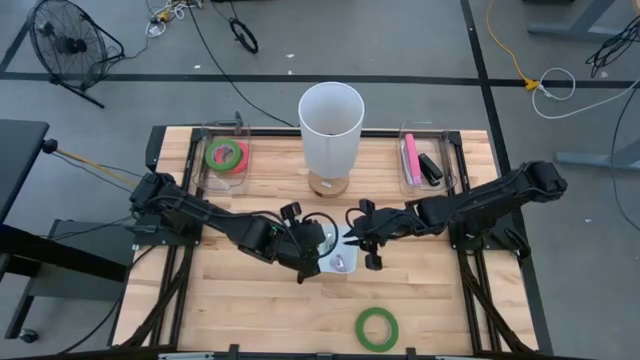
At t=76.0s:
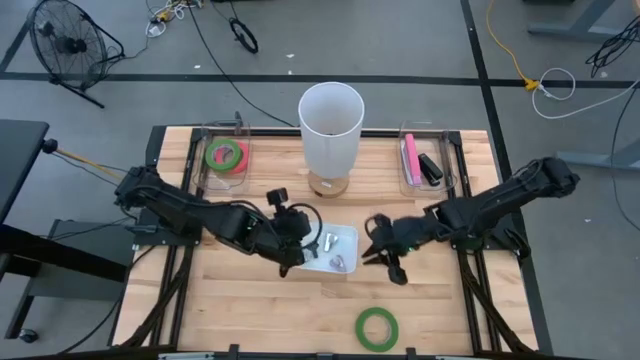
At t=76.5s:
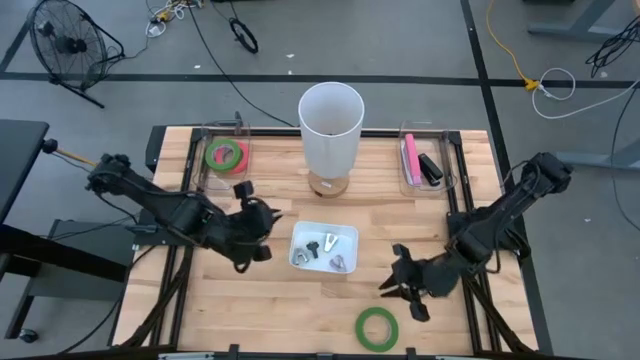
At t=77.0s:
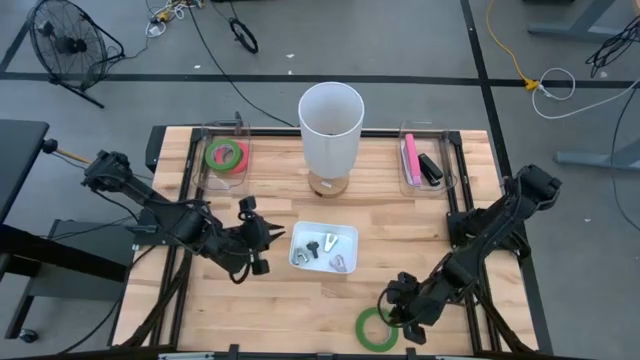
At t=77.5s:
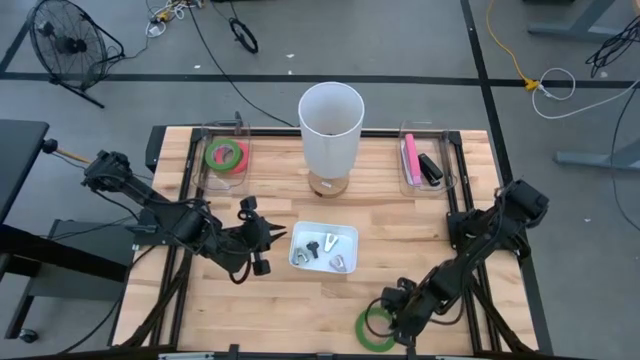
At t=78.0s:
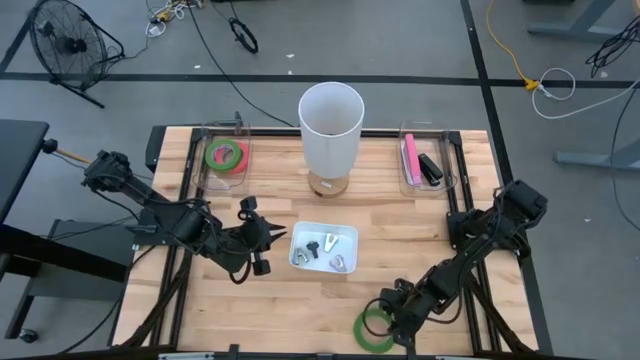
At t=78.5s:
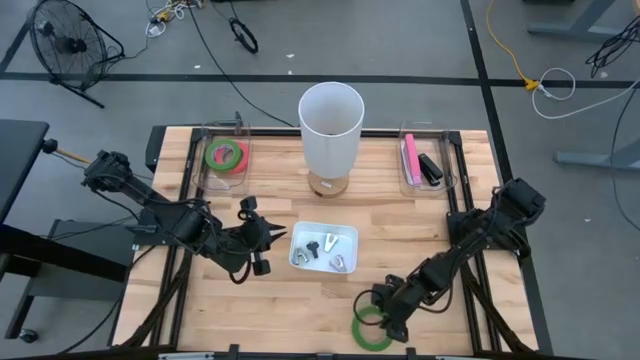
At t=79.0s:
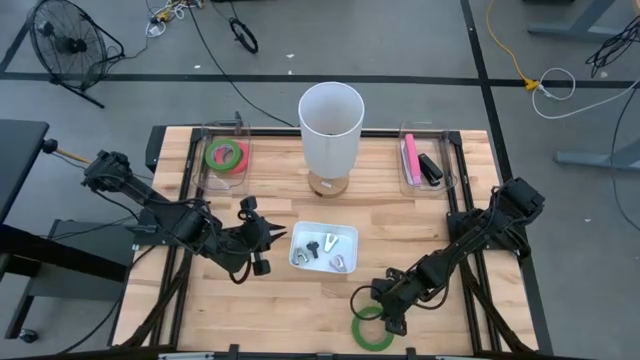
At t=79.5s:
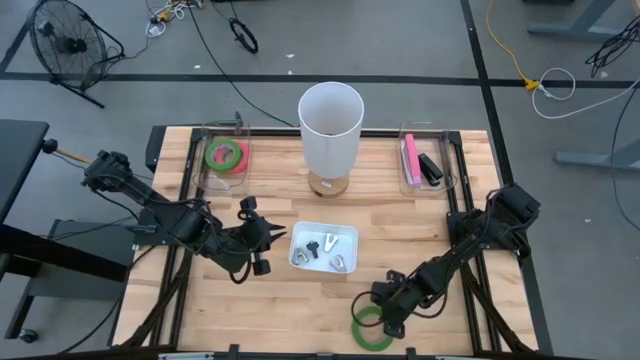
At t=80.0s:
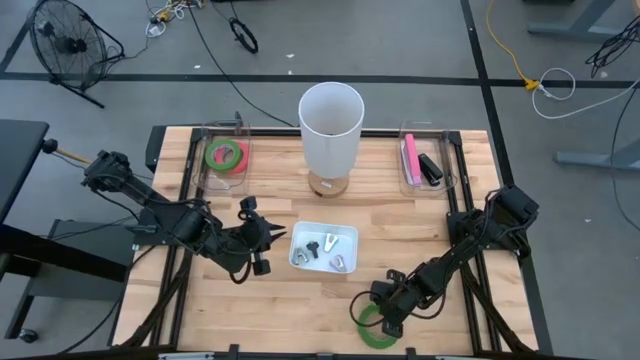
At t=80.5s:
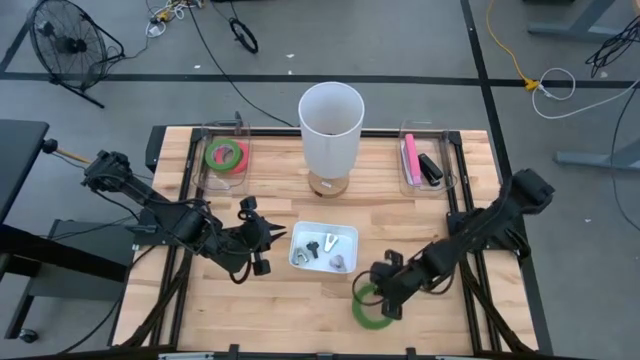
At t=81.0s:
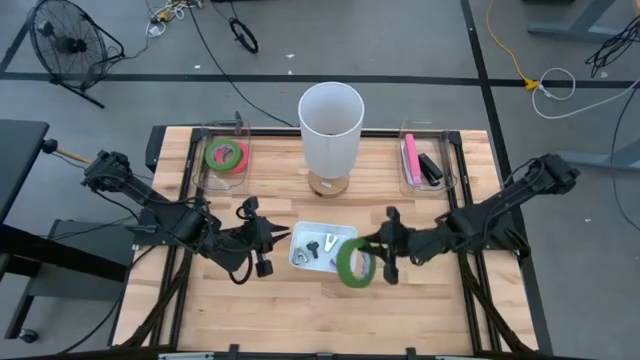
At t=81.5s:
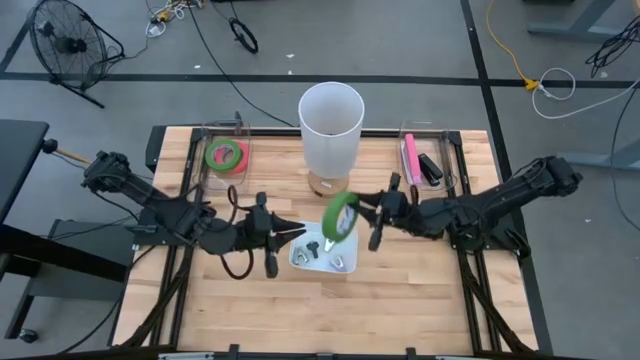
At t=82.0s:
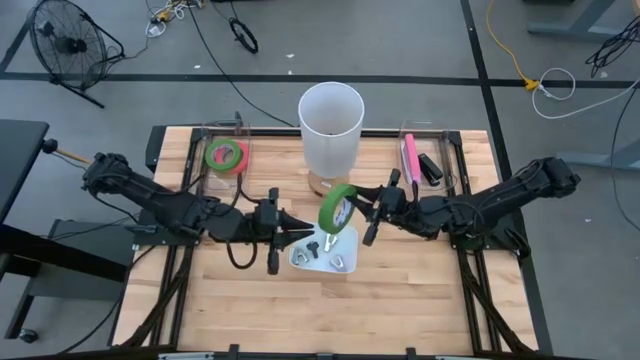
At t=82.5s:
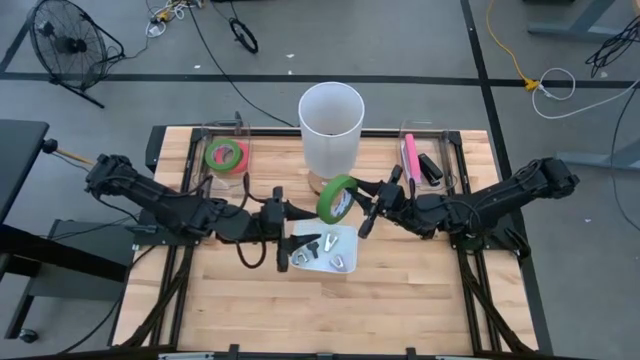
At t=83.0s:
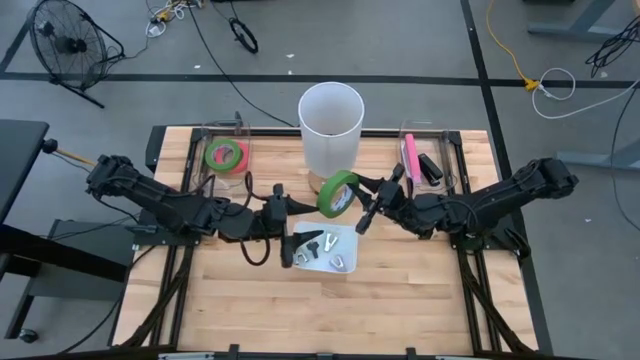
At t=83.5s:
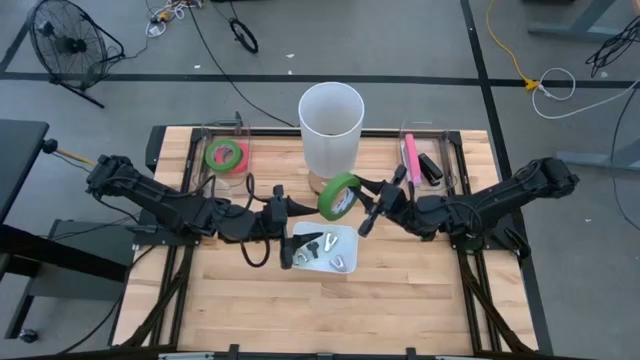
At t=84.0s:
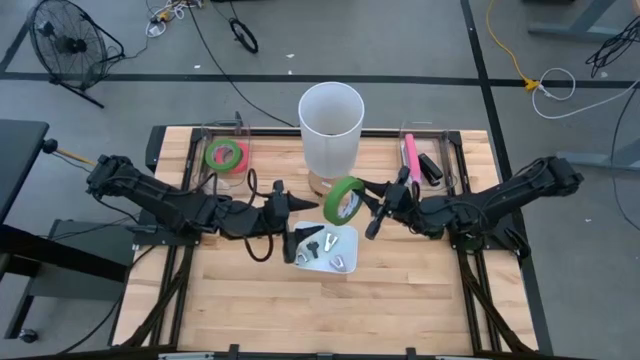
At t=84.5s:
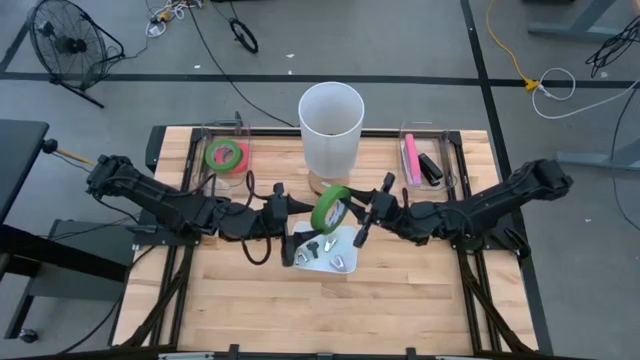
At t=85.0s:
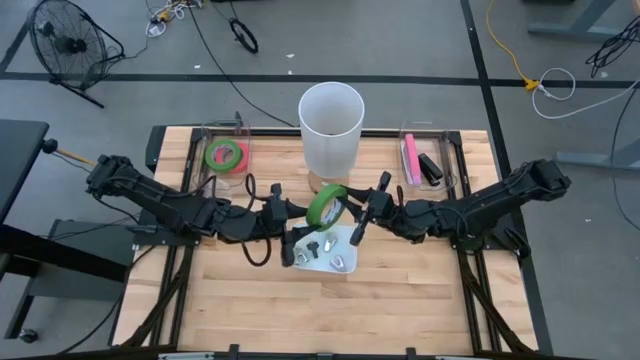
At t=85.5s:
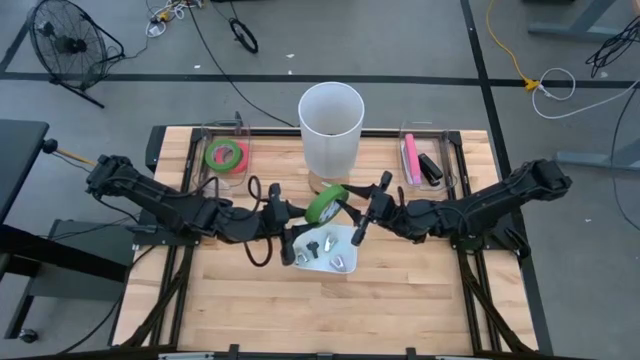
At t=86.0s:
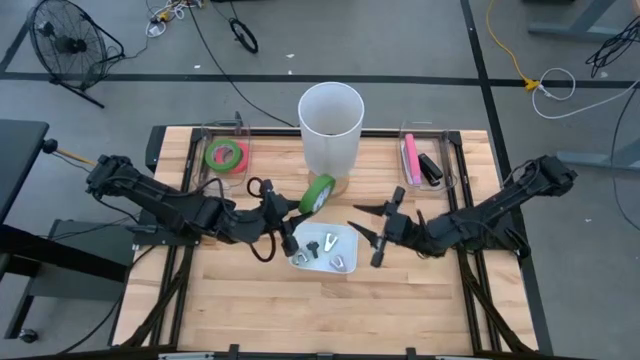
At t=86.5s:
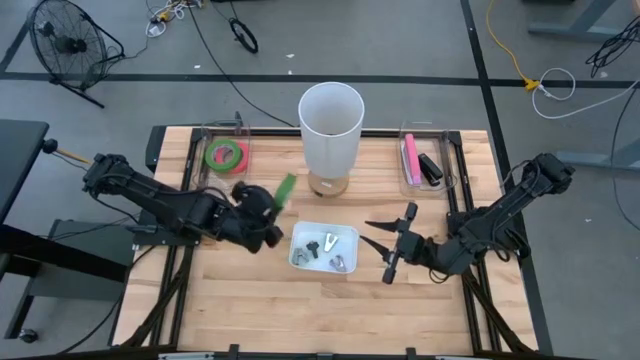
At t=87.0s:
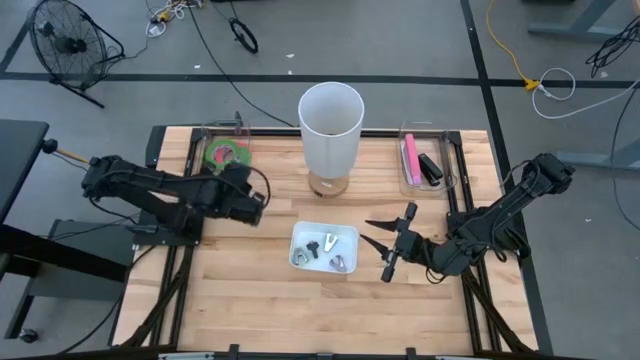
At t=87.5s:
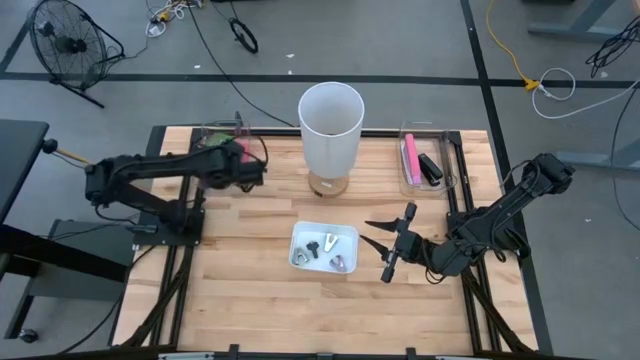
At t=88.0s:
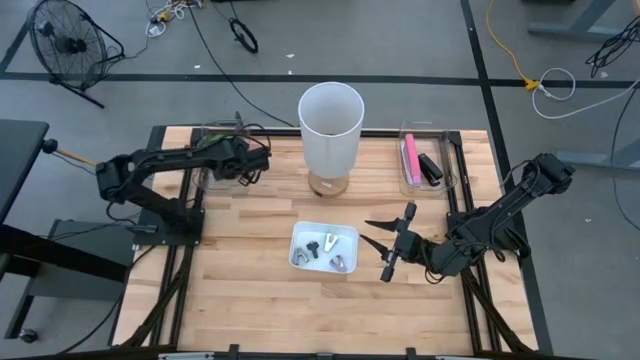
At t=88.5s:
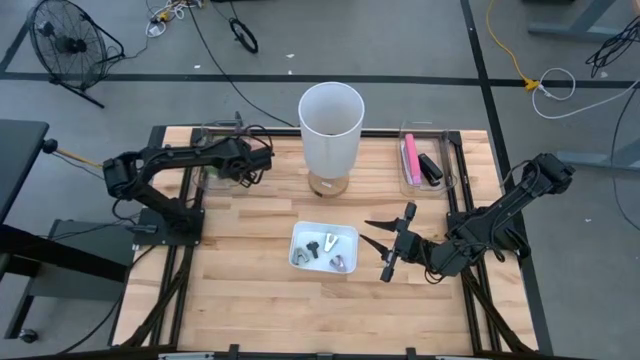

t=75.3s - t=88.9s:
Task: Pick and place Stapler, Stapler remover, tape
Put the green tape into the left transparent bin

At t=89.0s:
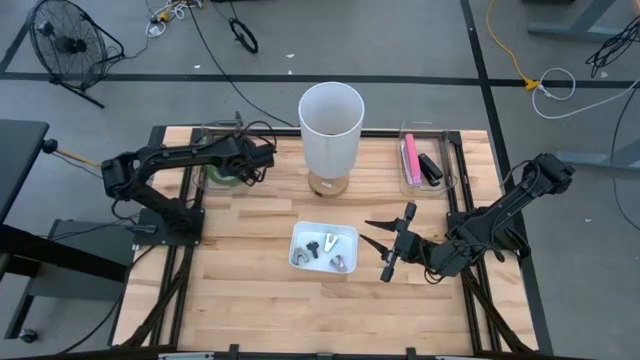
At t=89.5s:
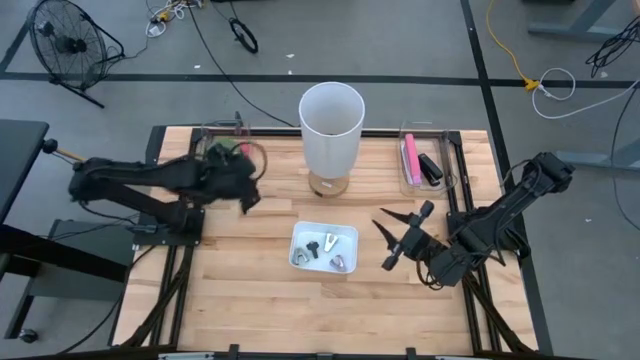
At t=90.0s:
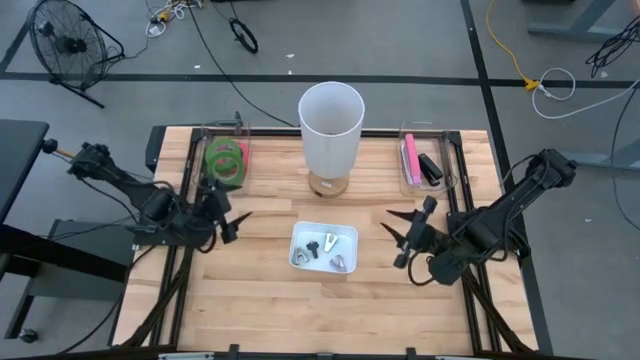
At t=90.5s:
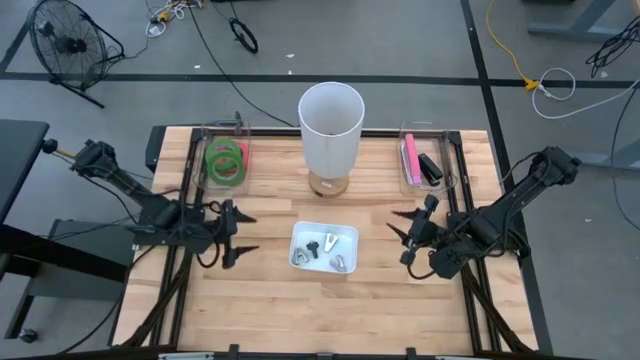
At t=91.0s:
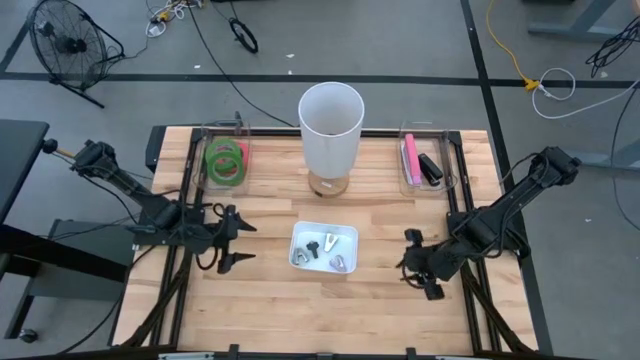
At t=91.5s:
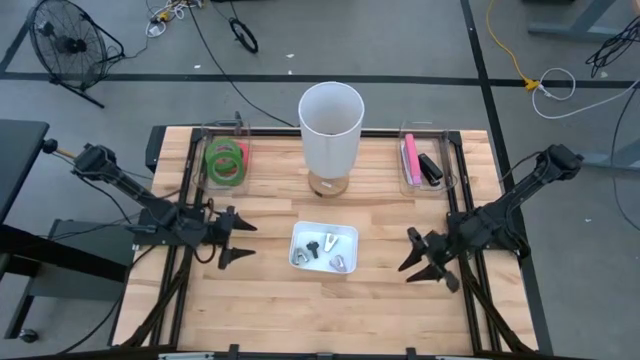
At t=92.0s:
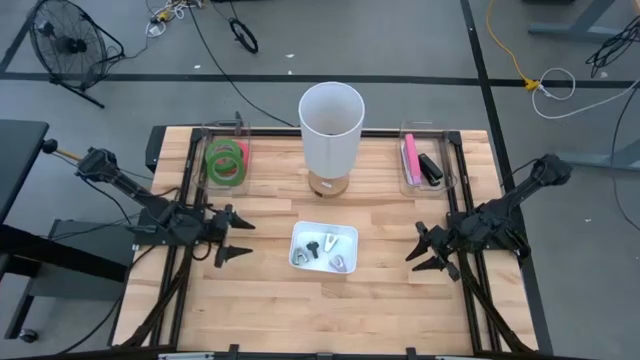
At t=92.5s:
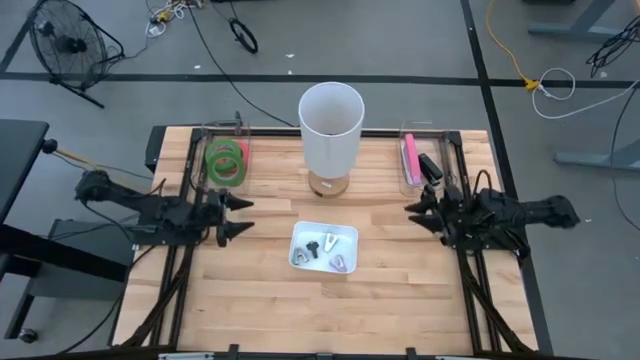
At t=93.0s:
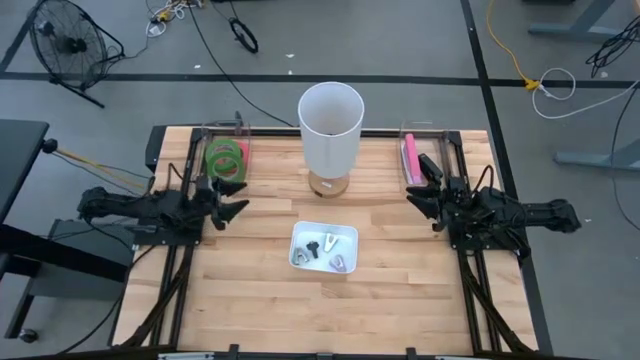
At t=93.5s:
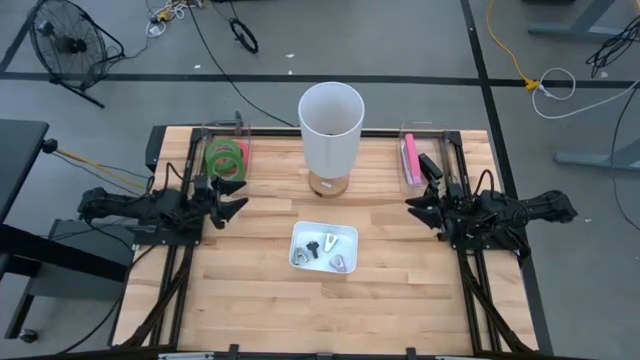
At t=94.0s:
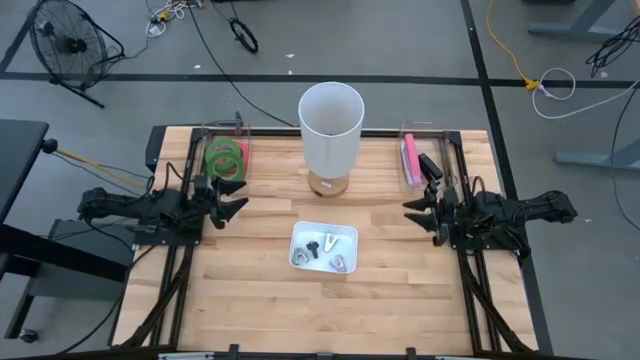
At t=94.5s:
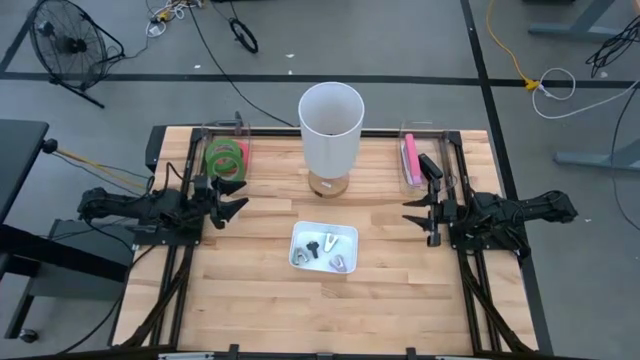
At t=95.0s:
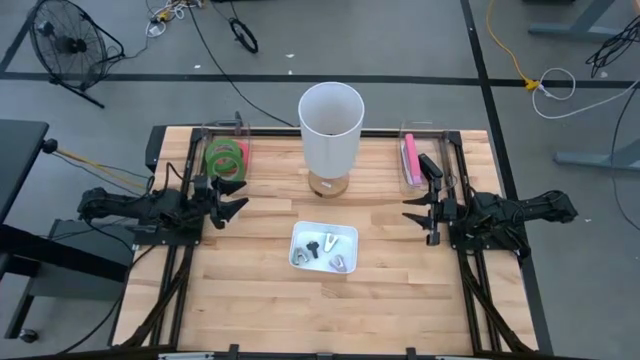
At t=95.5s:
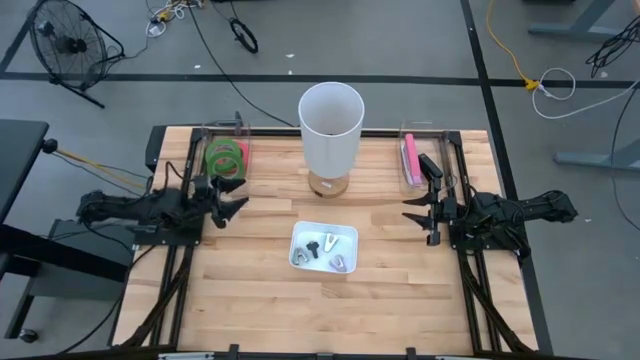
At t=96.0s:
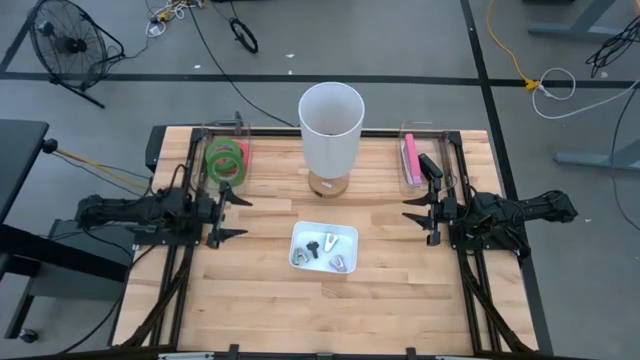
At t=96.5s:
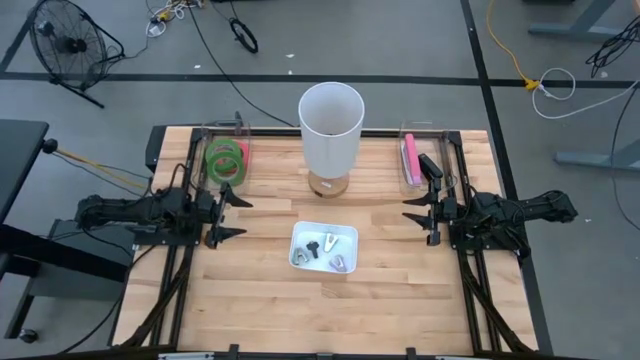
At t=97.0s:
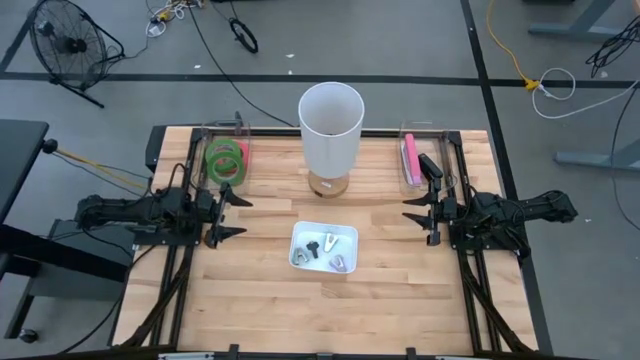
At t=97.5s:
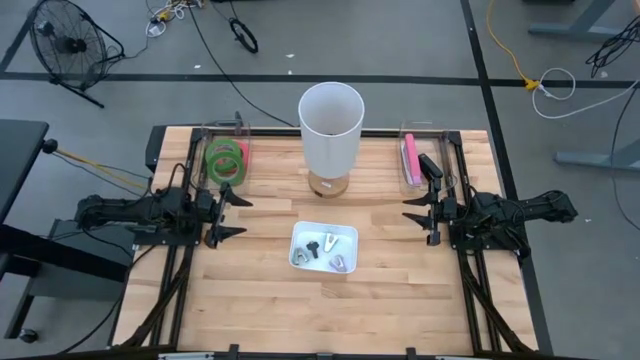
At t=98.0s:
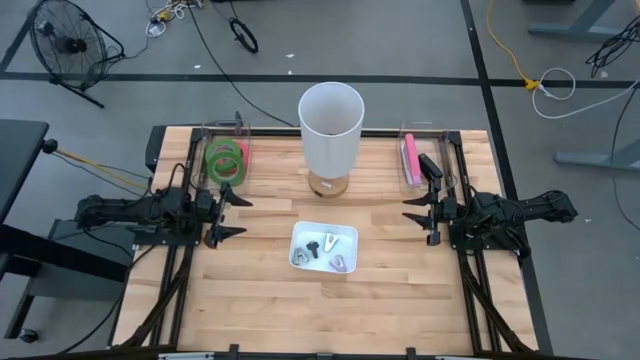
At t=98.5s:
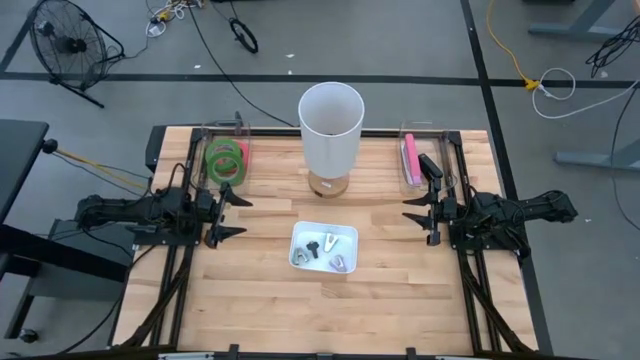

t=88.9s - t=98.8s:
Return to Home Position
